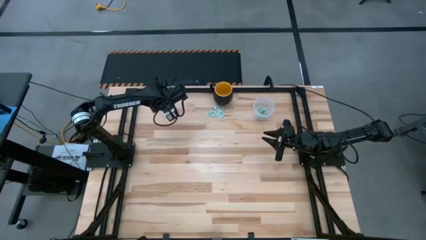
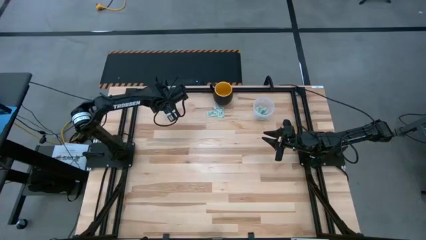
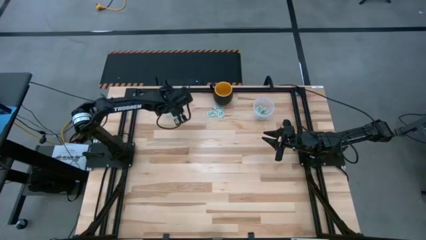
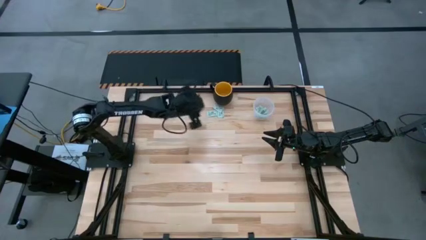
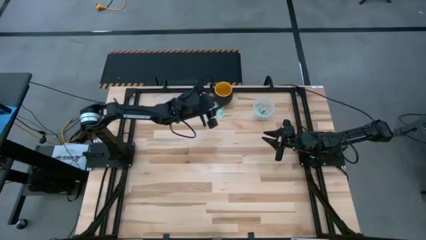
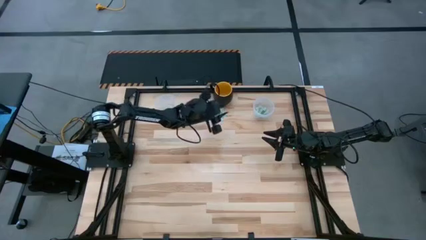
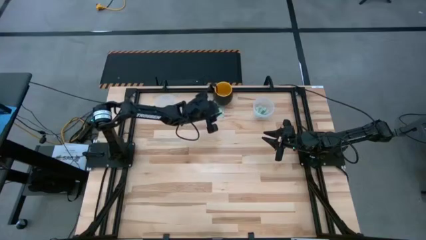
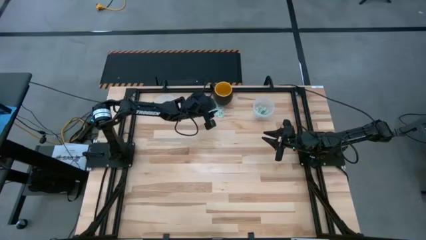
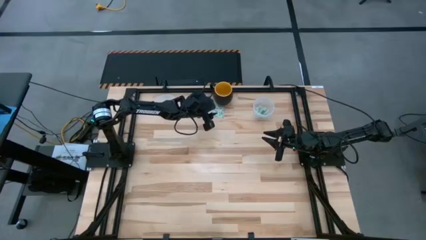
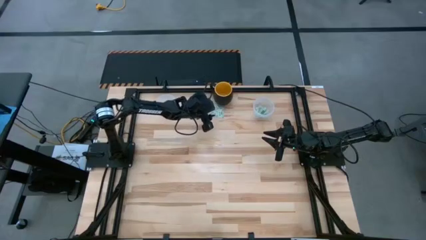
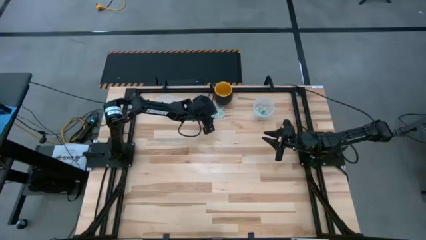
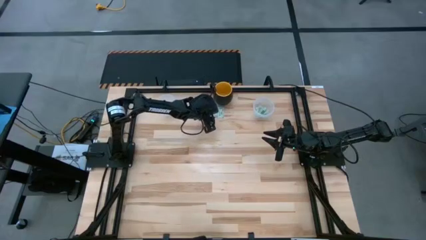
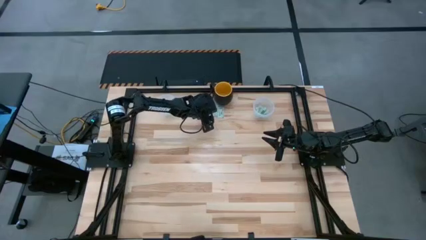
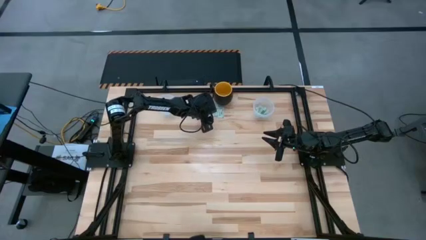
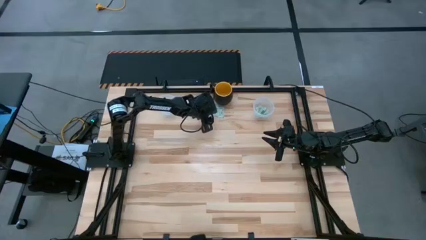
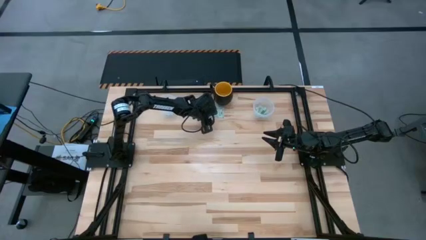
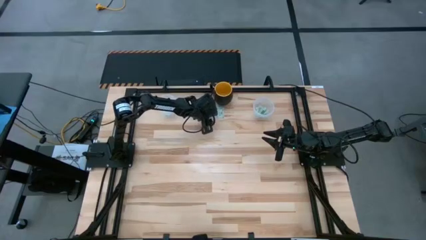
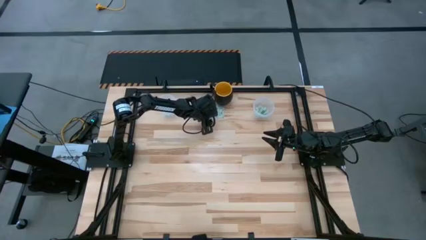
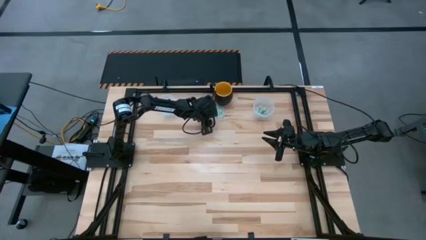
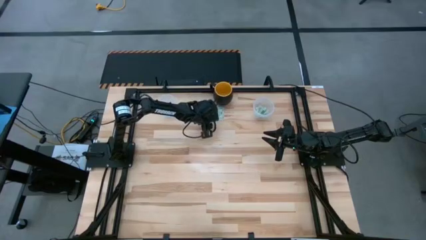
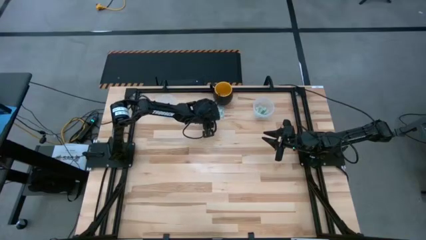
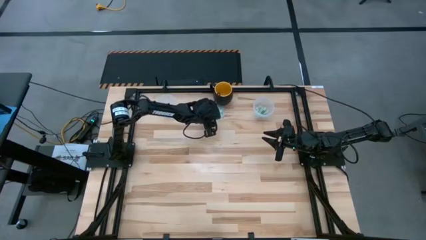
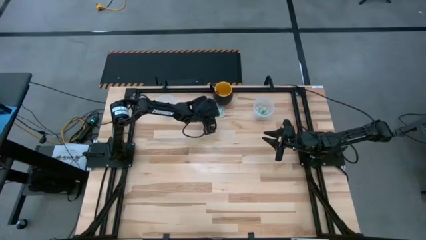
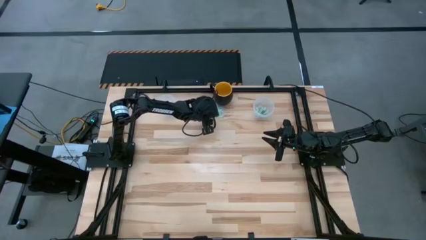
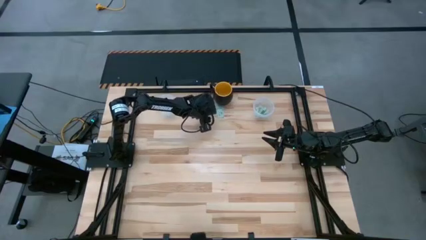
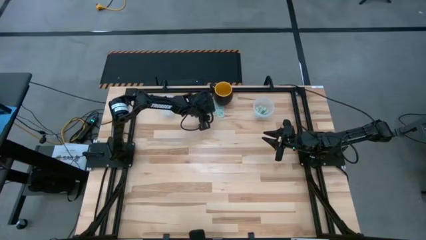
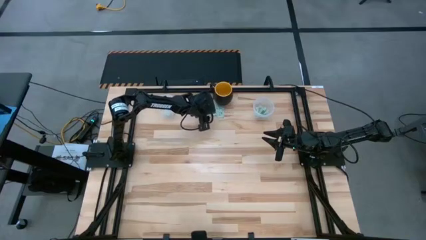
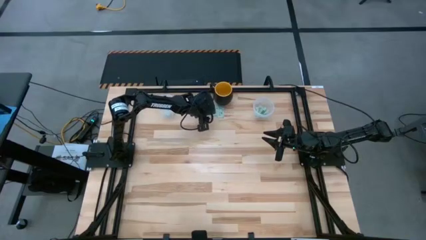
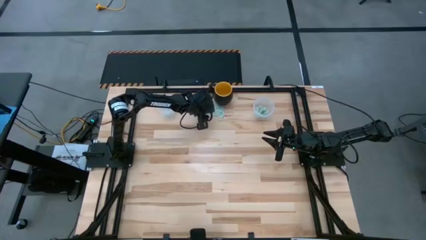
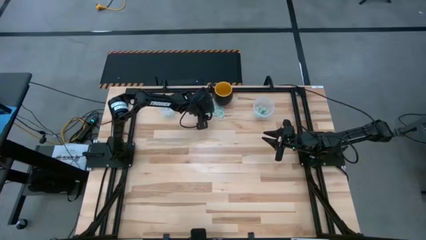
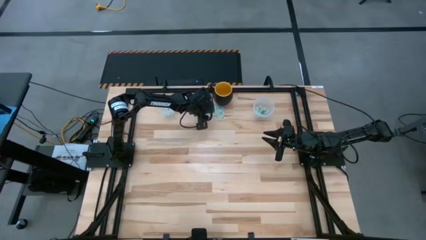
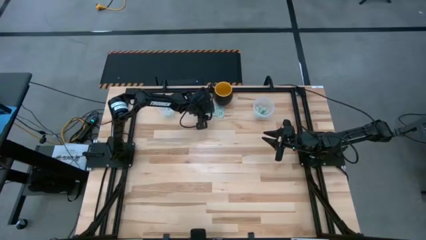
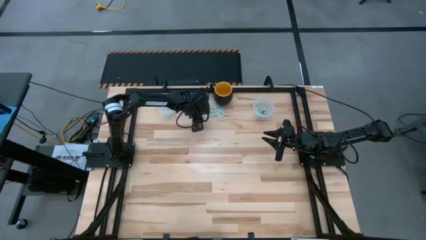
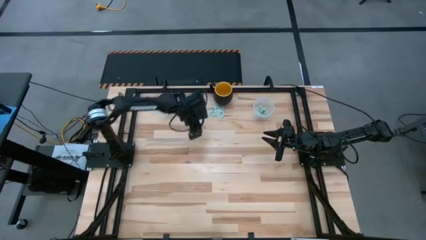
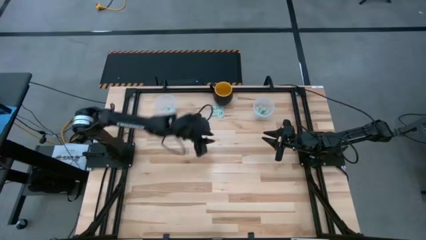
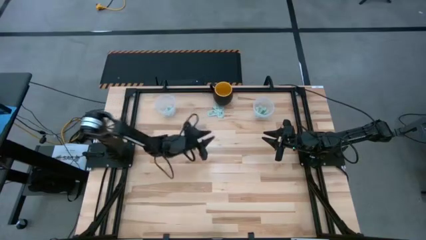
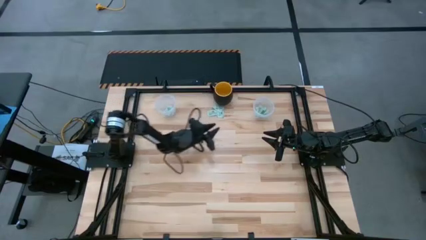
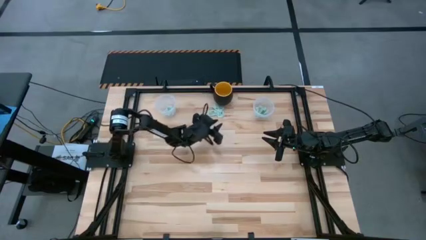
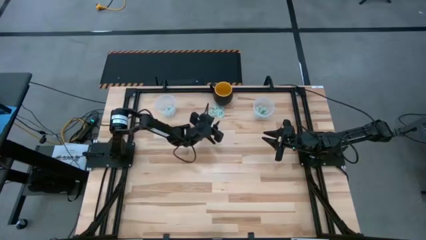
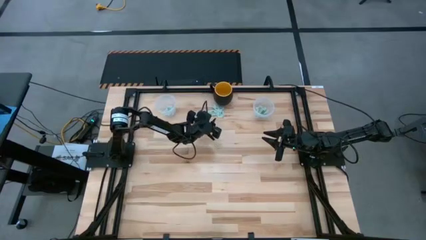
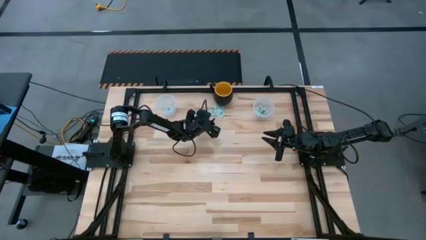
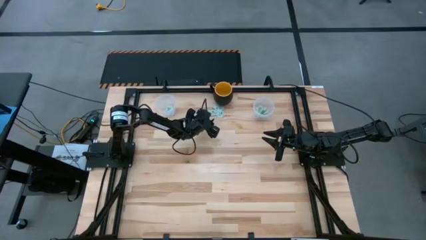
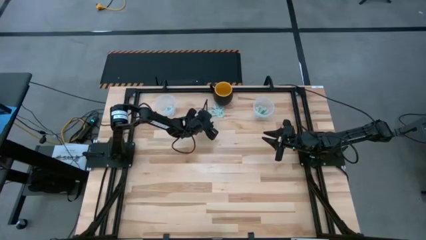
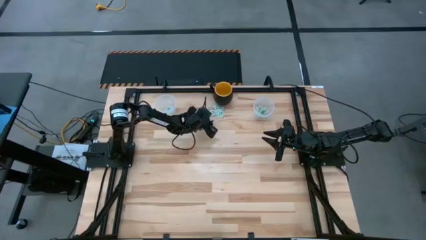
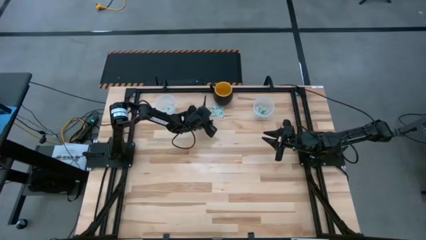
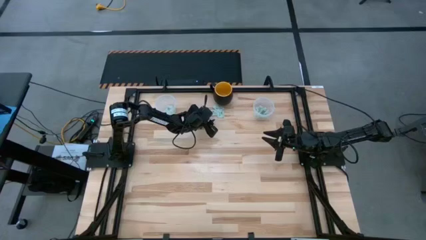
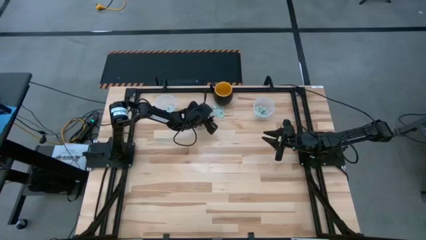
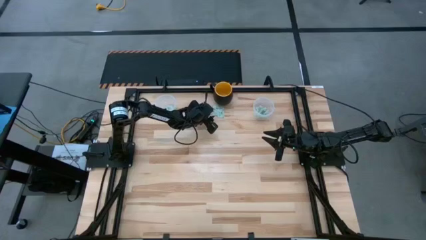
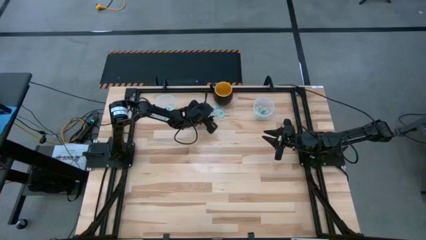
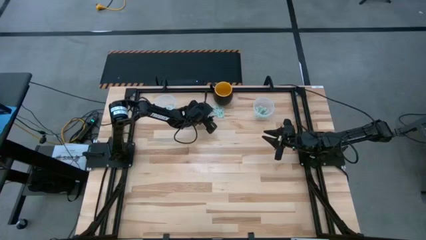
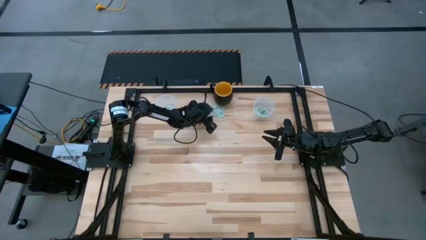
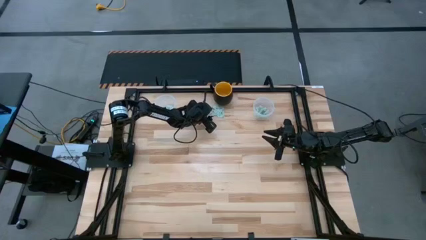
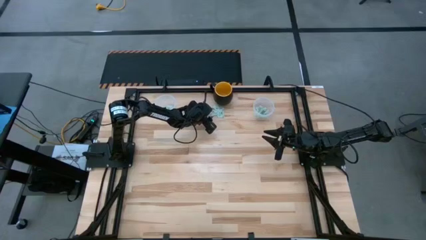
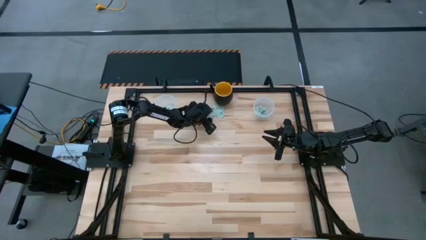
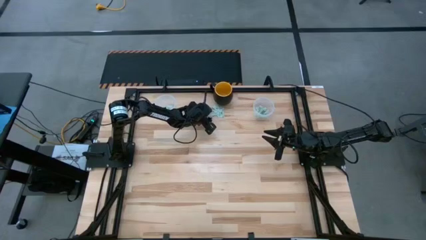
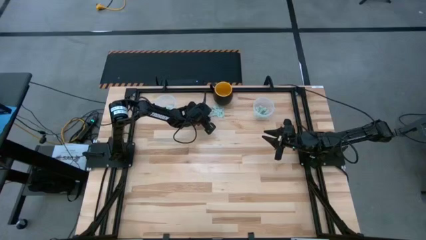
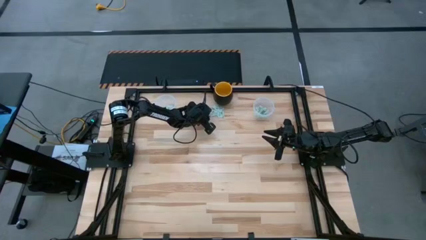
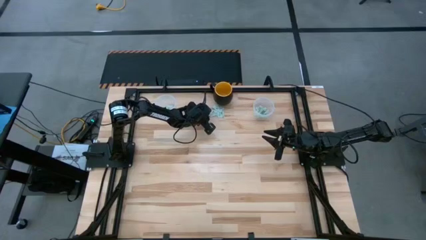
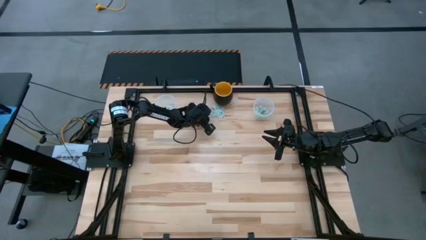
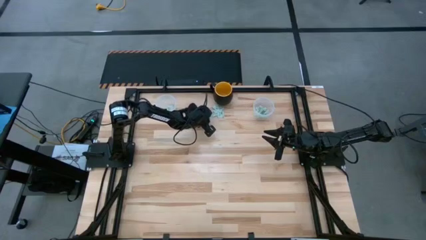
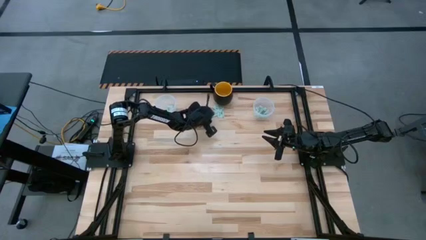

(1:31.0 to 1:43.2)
Task: Pick and place Stevia / Truvia into bins
Put the stevia packet into the left transparent container

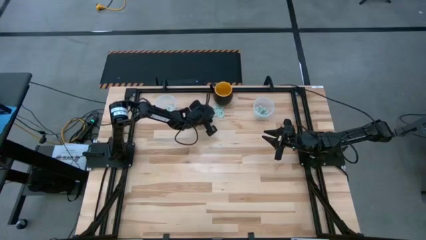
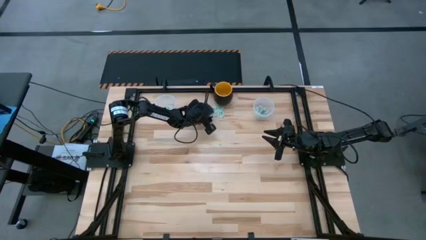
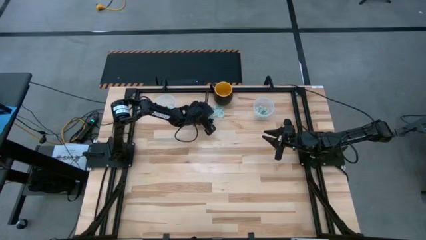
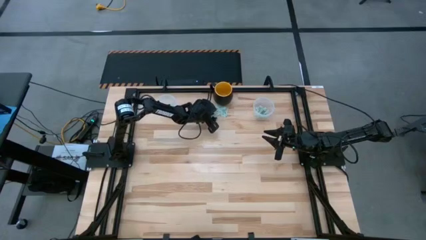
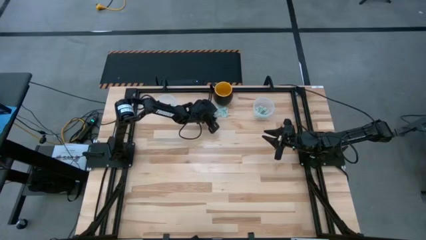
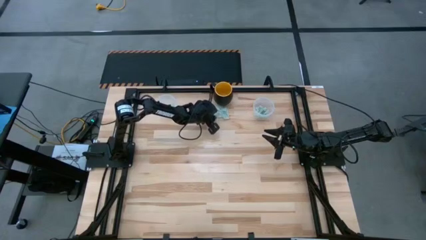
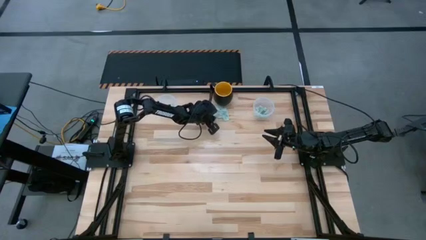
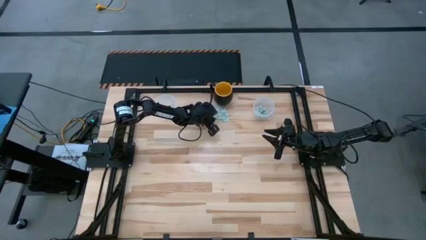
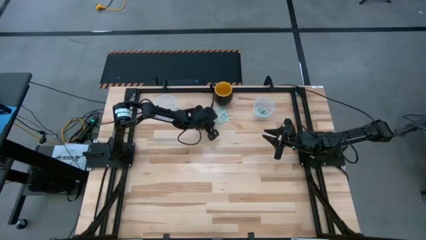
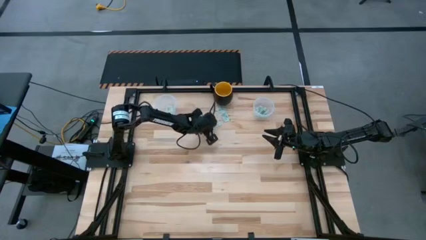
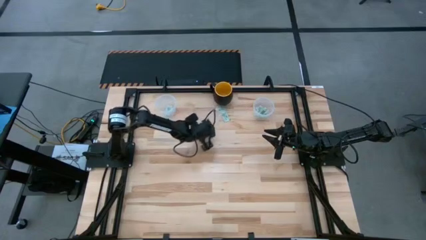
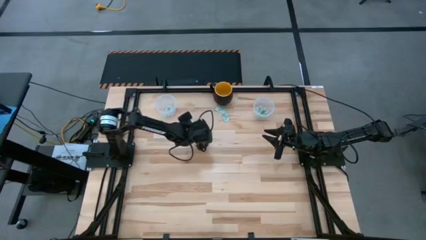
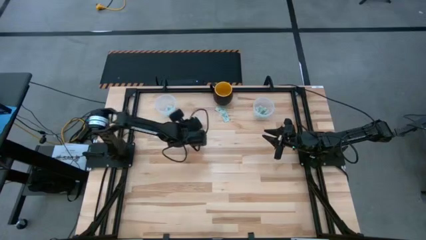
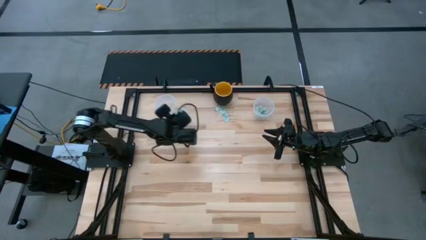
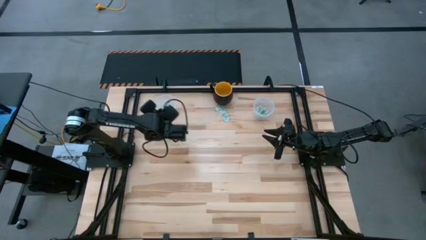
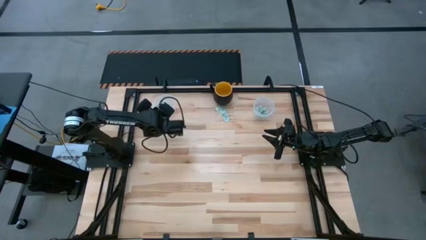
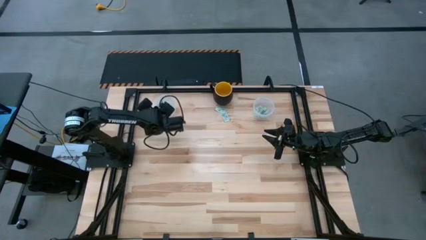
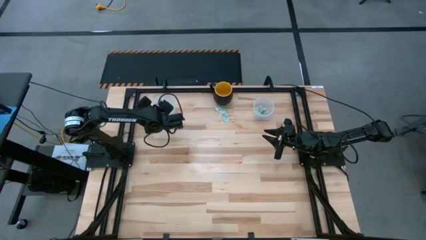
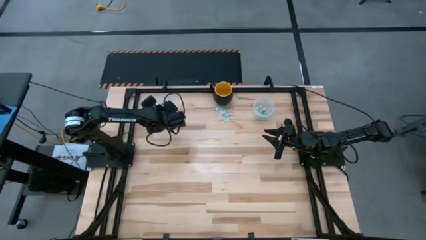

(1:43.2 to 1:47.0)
Put the stevia packet into the left transparent container
